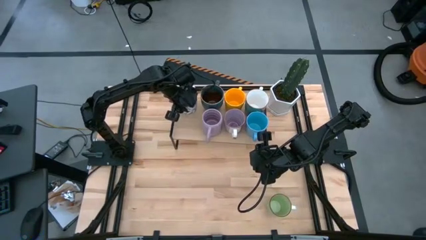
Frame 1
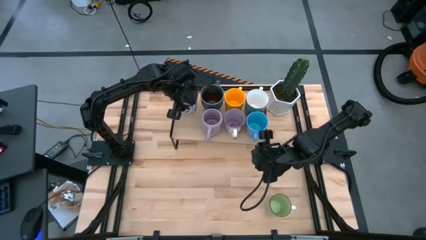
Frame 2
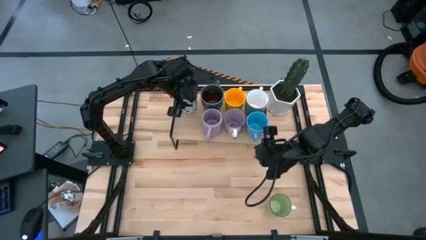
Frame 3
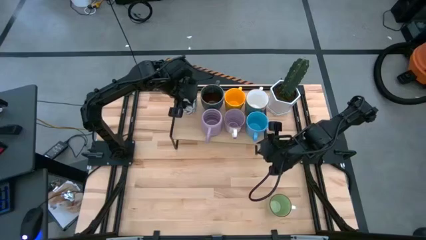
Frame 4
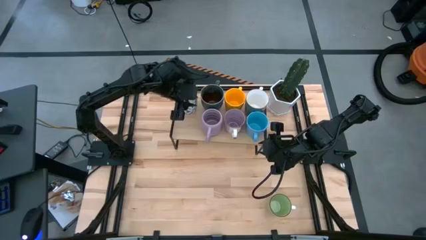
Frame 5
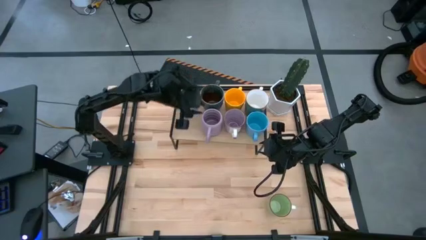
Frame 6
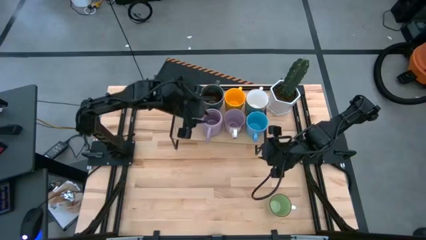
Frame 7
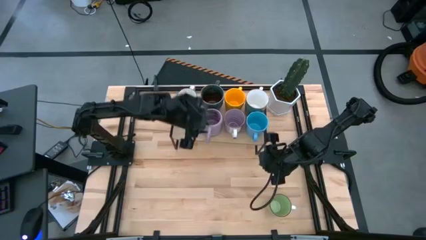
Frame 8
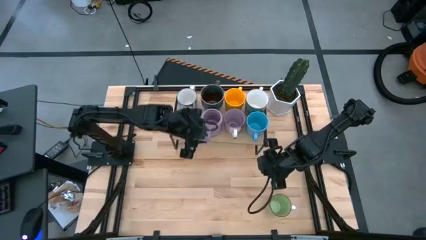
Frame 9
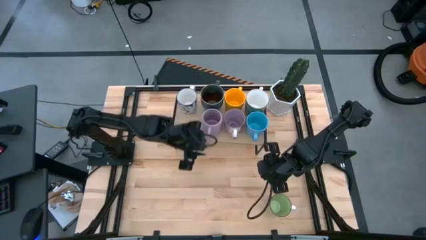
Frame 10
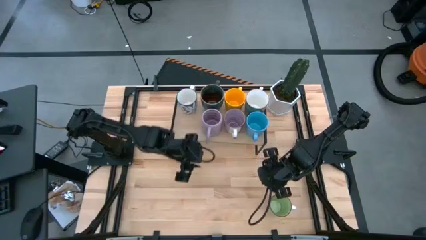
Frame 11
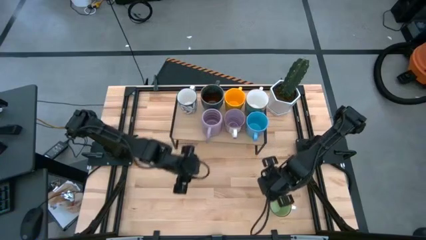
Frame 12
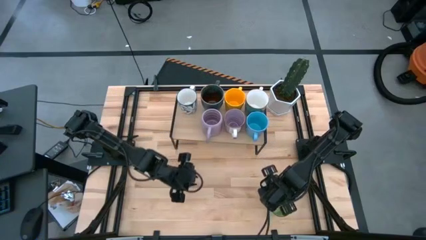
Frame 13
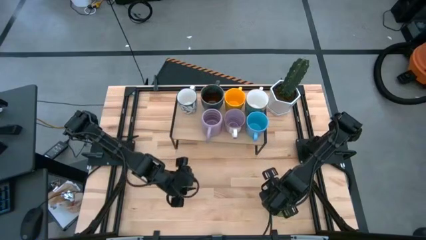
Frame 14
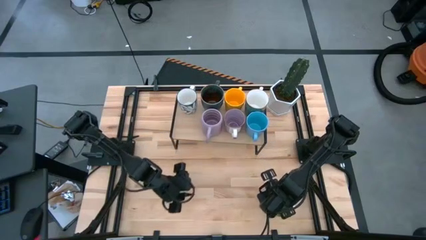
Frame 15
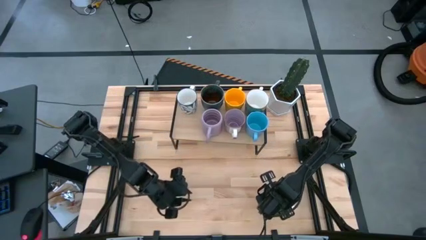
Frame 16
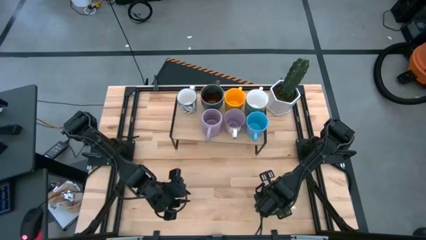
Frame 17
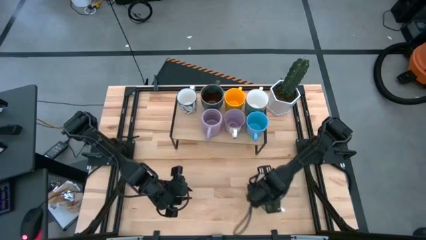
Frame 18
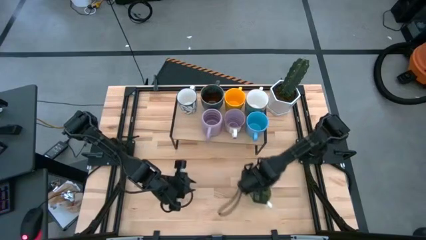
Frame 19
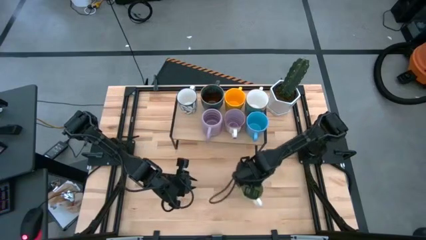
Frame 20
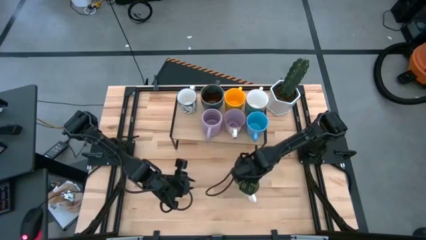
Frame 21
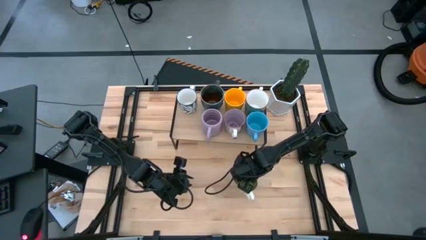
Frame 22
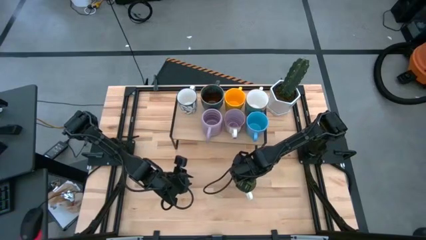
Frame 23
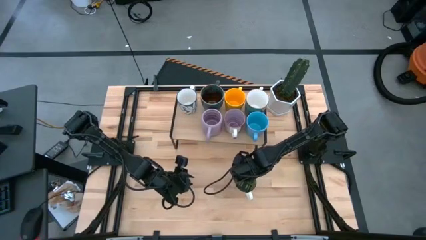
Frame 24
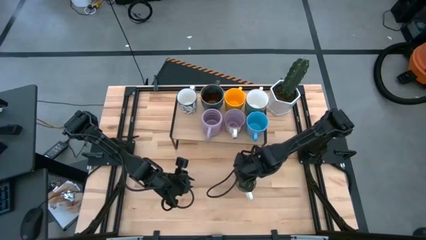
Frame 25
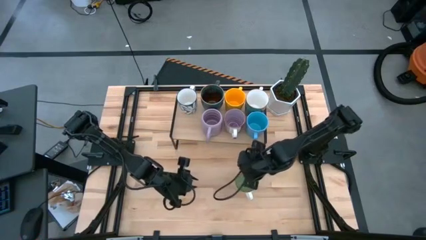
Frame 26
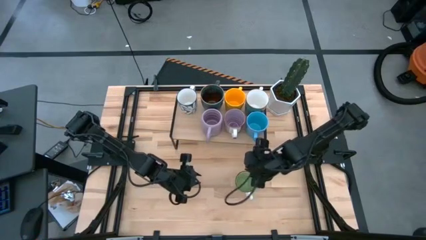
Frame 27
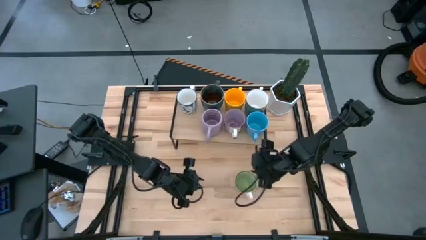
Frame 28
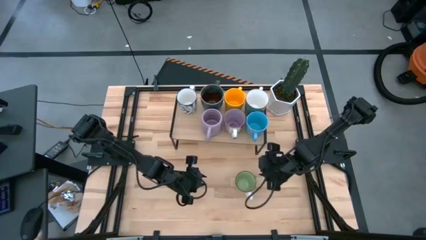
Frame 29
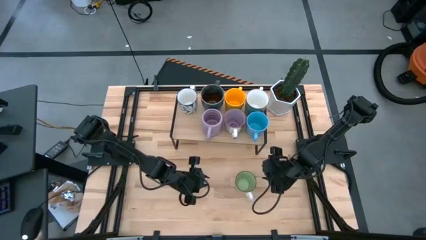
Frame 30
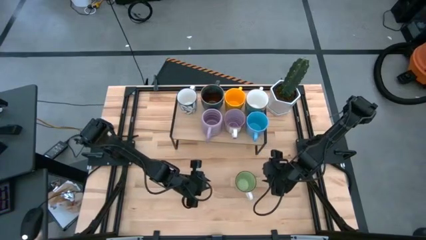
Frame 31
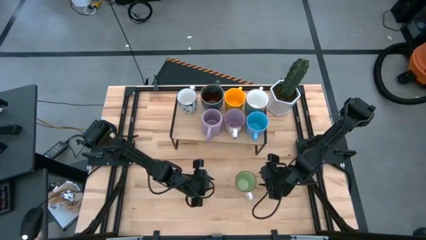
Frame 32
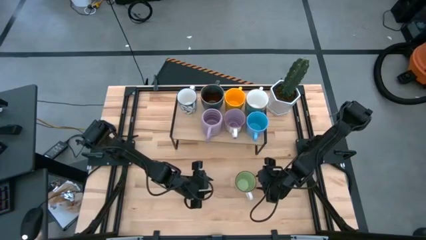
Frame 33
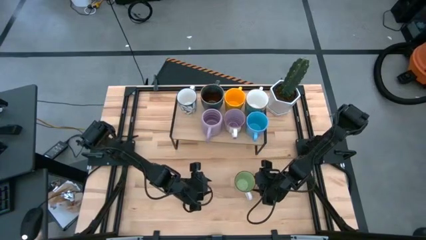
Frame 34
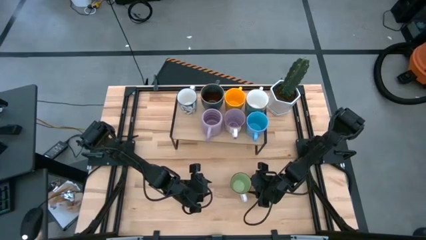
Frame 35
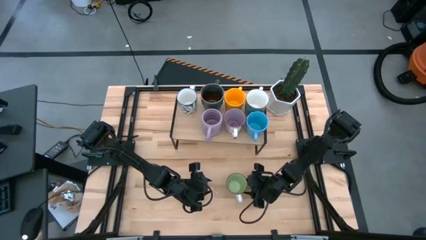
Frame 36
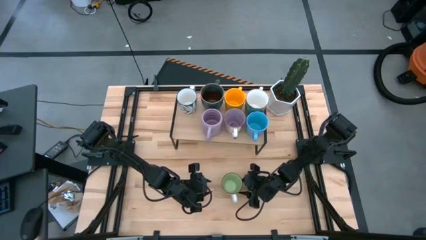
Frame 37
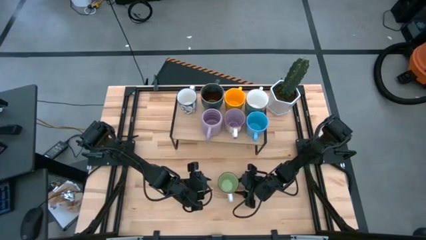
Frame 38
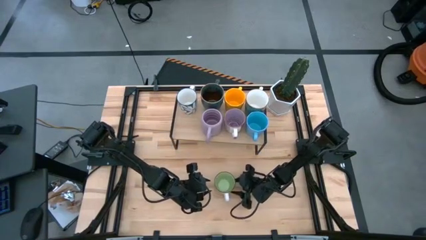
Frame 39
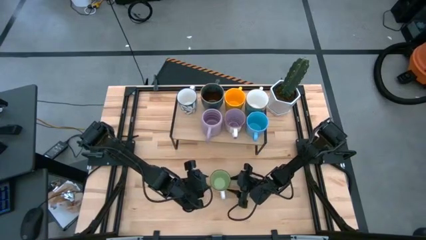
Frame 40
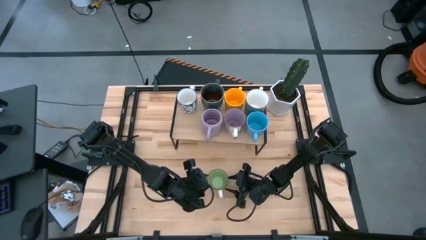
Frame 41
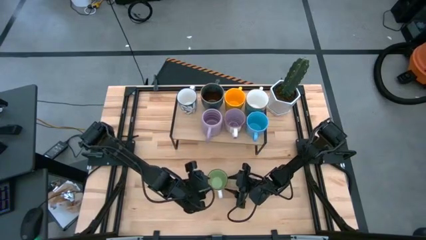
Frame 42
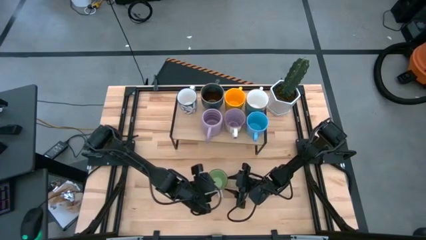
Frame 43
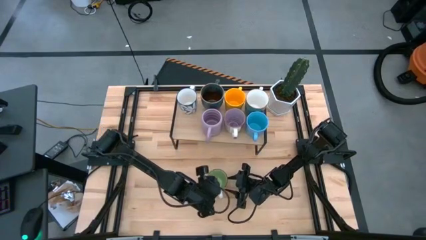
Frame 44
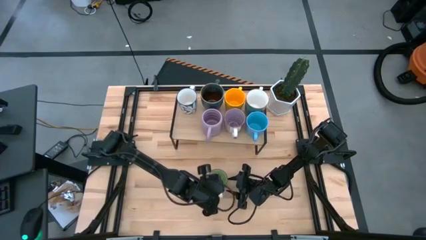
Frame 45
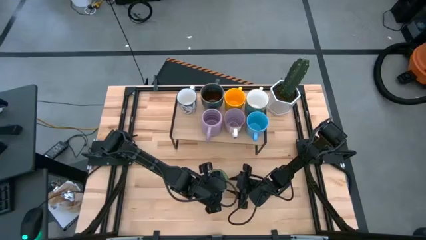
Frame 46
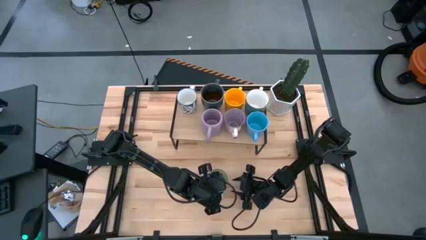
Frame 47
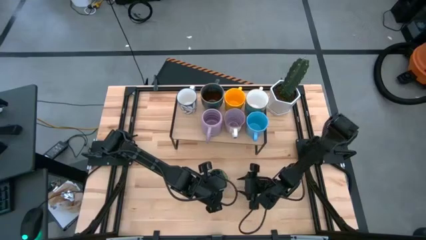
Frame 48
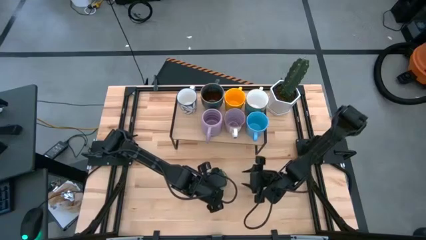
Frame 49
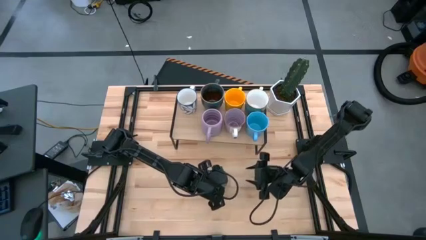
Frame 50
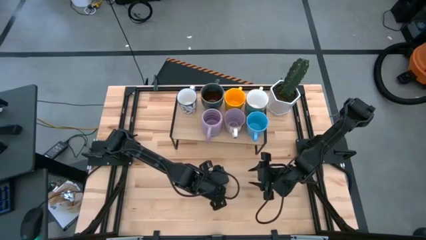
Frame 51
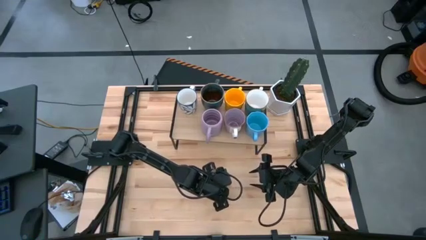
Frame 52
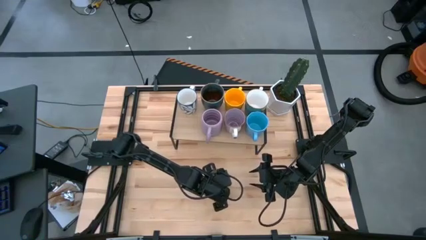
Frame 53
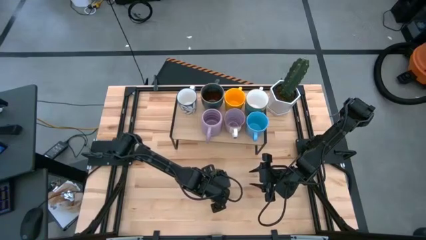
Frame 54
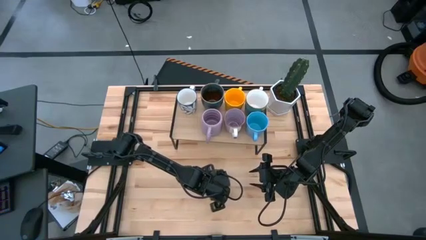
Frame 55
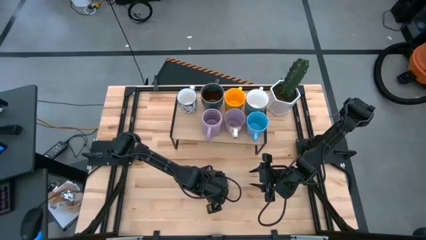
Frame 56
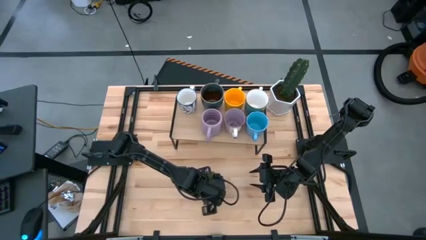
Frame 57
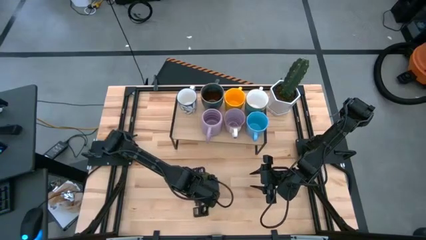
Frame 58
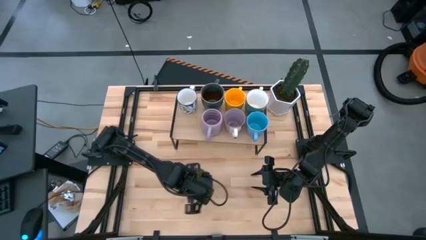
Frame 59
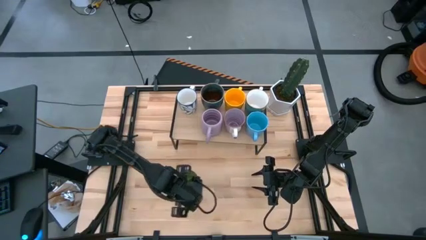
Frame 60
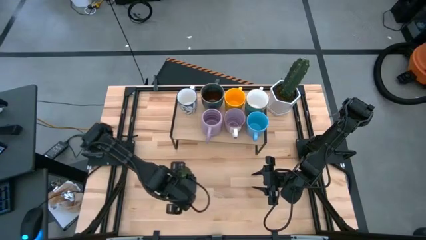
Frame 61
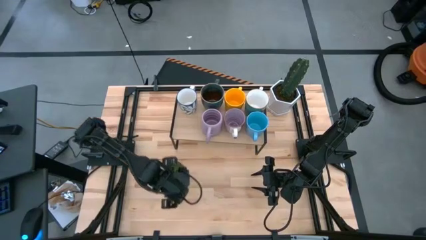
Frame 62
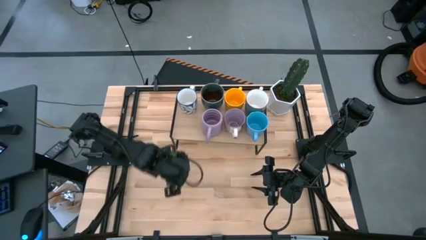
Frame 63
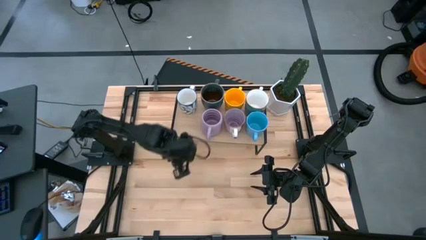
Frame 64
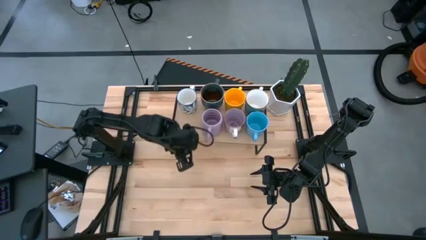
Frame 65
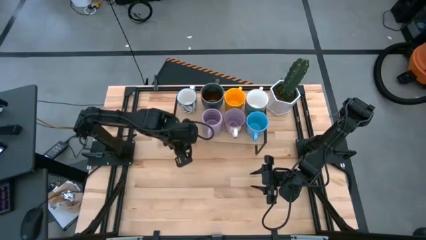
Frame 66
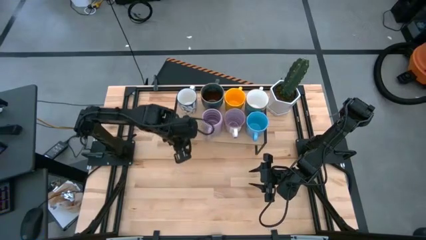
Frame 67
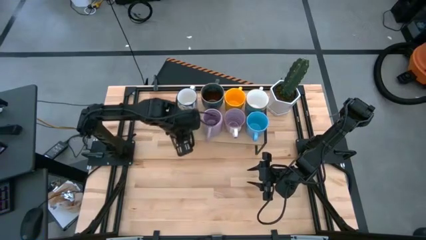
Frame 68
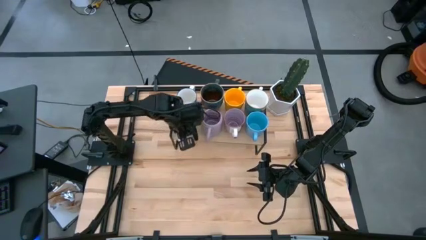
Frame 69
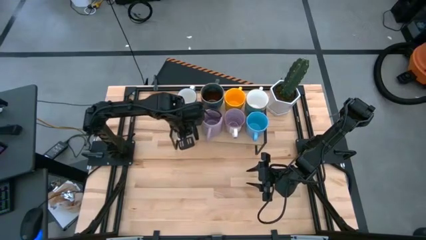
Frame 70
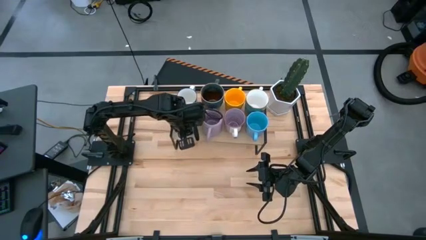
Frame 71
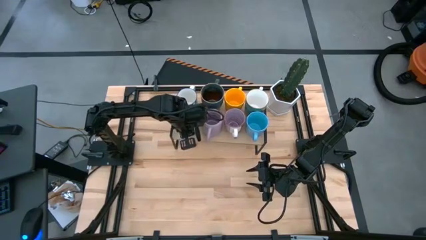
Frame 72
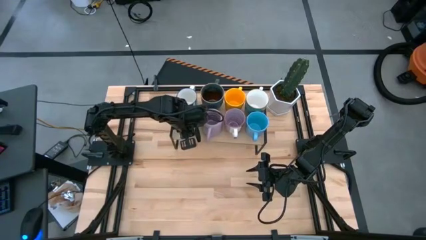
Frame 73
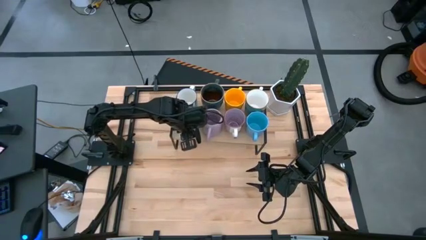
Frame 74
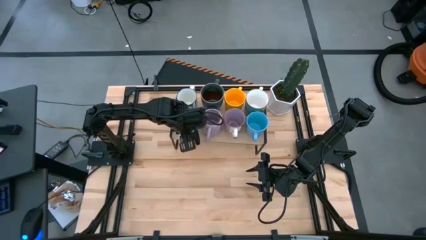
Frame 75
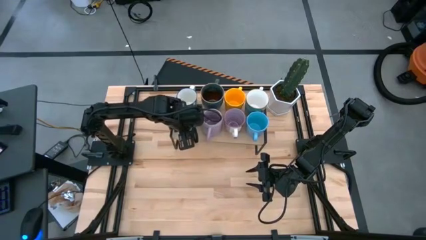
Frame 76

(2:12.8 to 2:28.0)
Task: Place coffee mugs
Put the green mug on the shelf

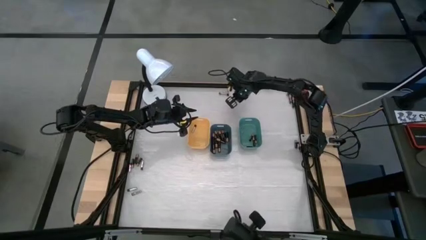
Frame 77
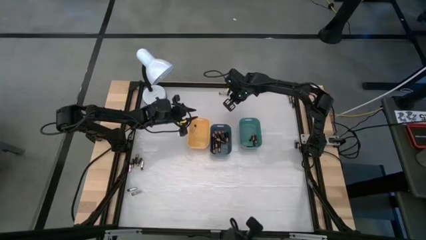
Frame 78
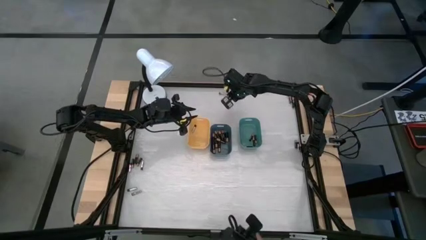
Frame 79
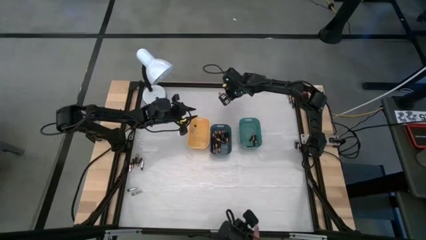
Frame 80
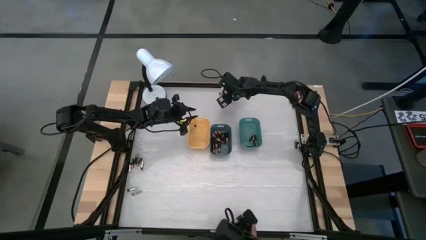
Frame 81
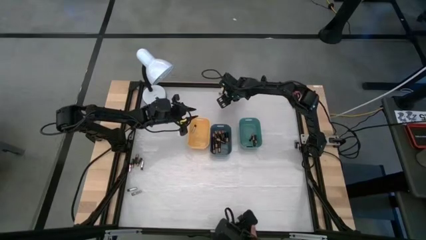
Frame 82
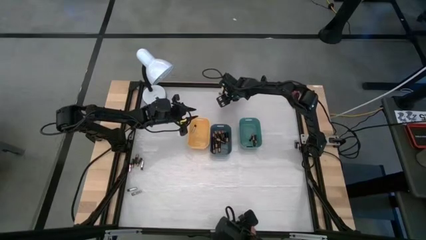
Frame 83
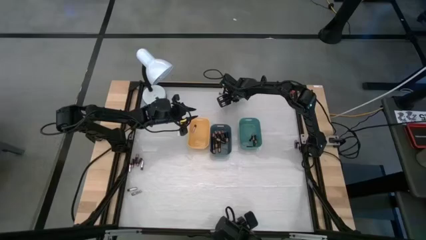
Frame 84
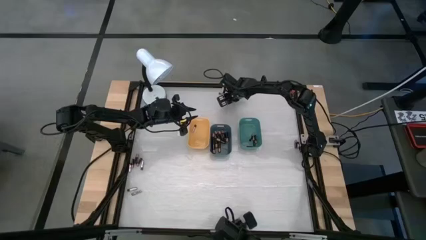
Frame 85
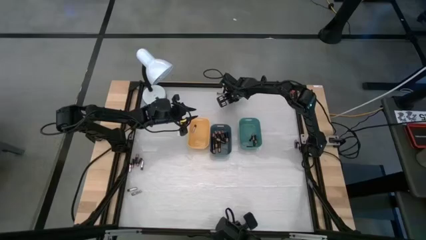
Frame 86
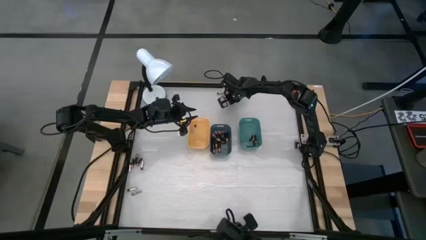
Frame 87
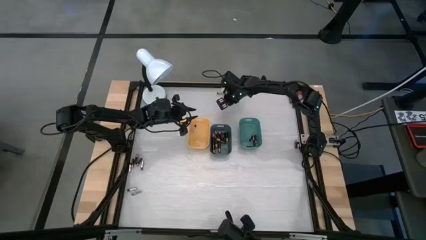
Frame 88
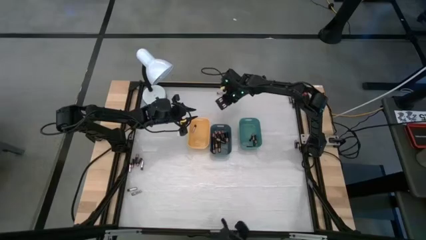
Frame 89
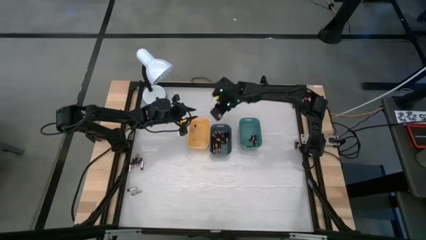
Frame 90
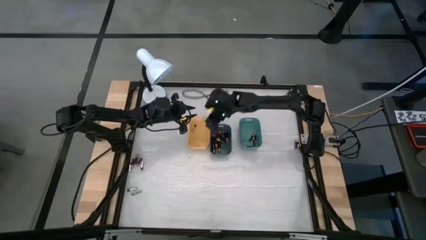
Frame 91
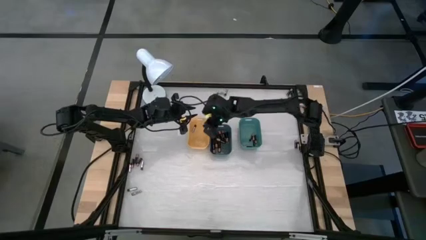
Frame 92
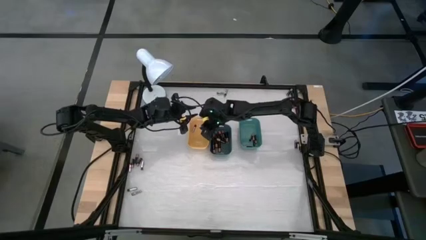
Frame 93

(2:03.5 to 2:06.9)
Task: Sort batteries
Put the silver battery into the yellow bin
